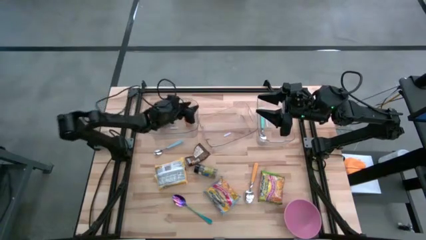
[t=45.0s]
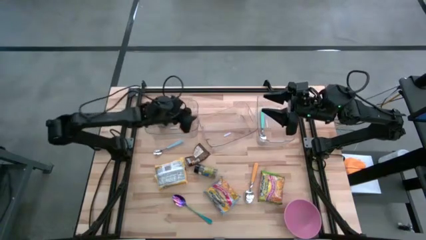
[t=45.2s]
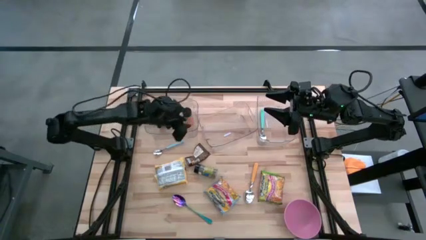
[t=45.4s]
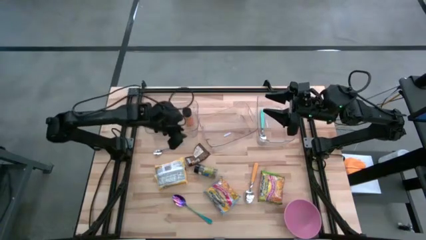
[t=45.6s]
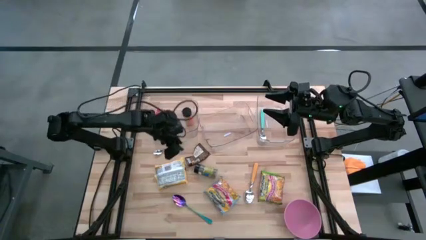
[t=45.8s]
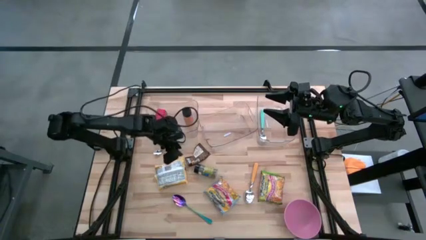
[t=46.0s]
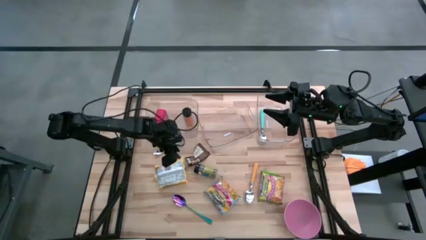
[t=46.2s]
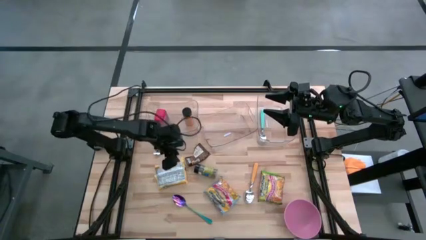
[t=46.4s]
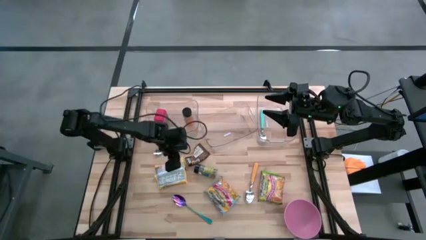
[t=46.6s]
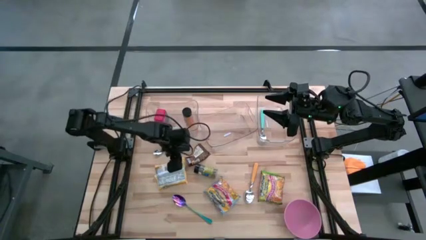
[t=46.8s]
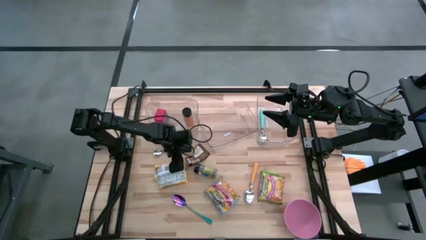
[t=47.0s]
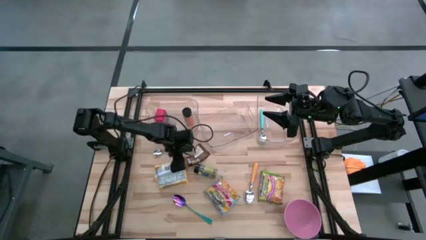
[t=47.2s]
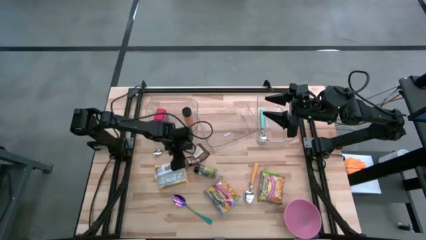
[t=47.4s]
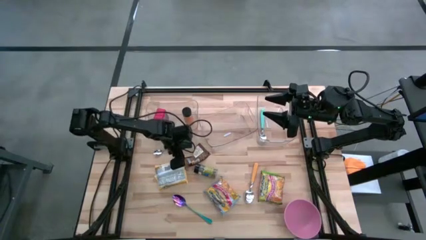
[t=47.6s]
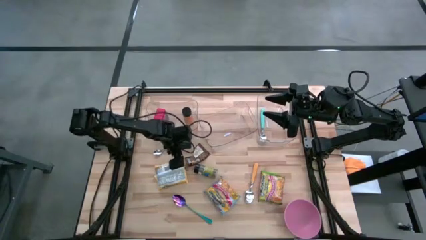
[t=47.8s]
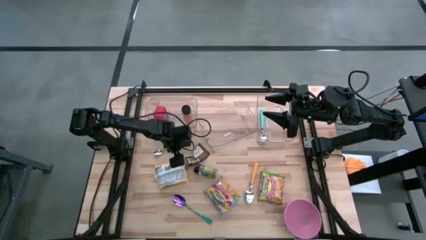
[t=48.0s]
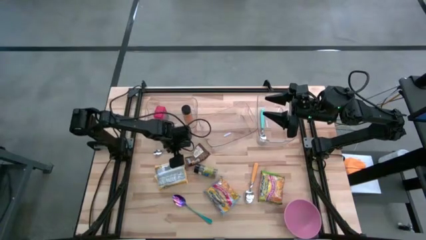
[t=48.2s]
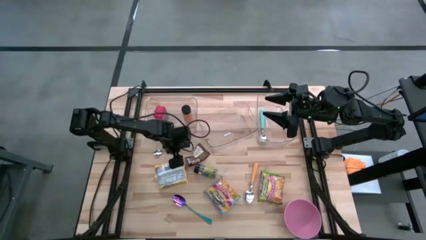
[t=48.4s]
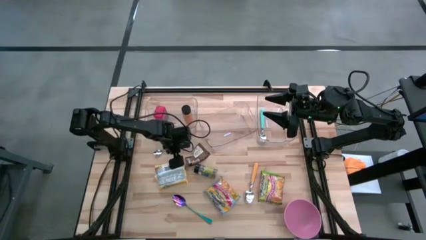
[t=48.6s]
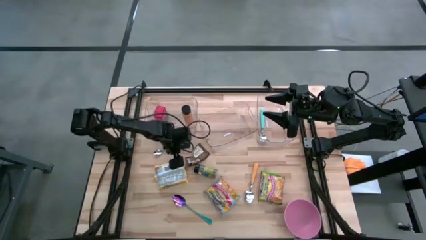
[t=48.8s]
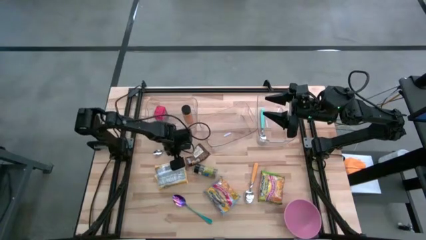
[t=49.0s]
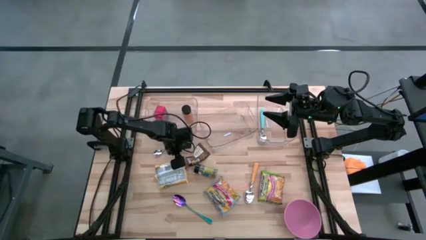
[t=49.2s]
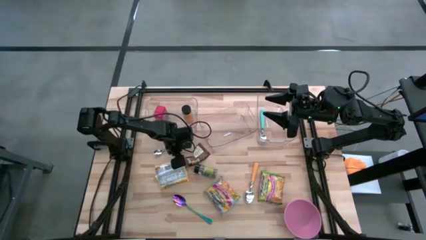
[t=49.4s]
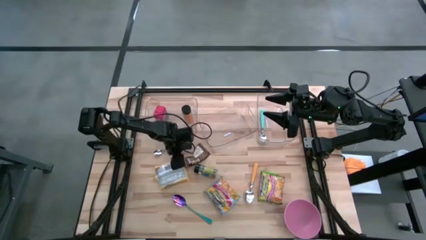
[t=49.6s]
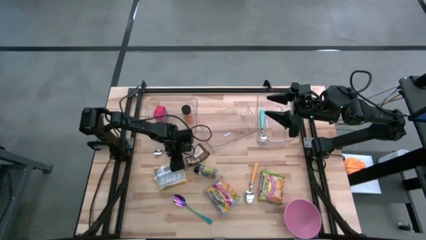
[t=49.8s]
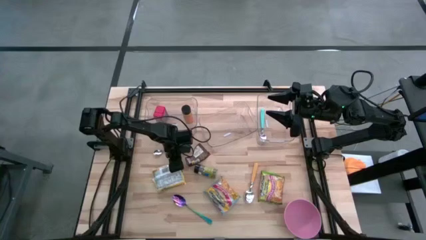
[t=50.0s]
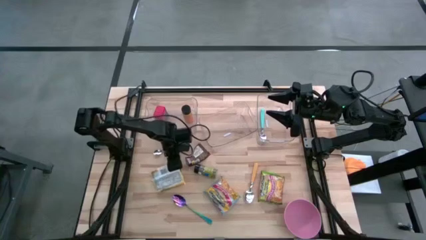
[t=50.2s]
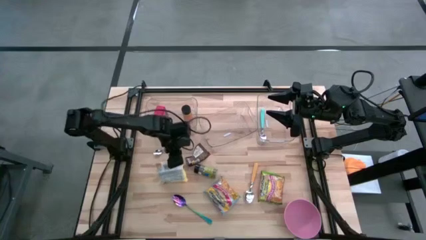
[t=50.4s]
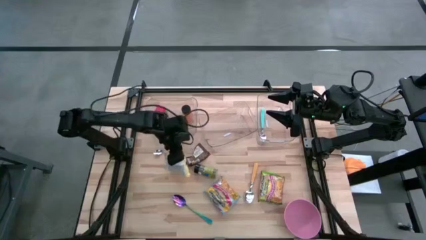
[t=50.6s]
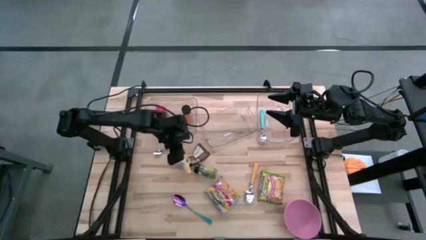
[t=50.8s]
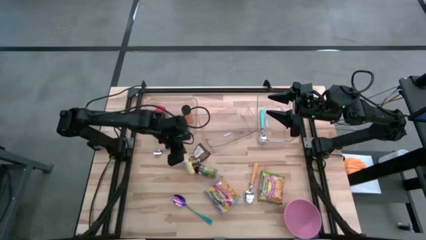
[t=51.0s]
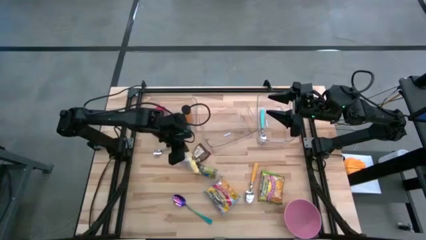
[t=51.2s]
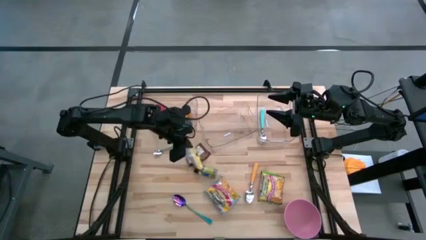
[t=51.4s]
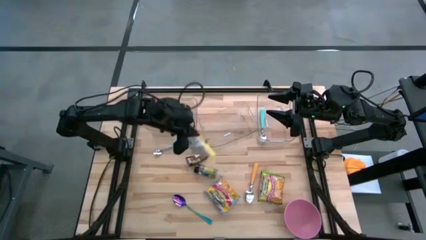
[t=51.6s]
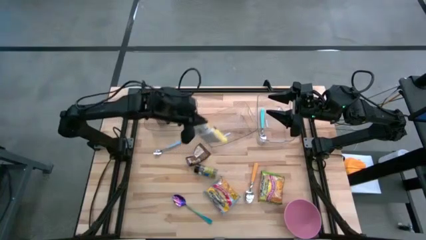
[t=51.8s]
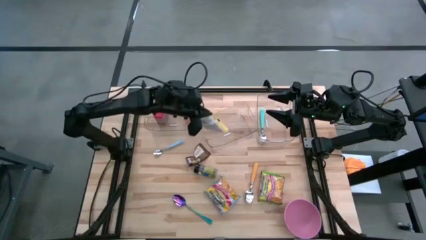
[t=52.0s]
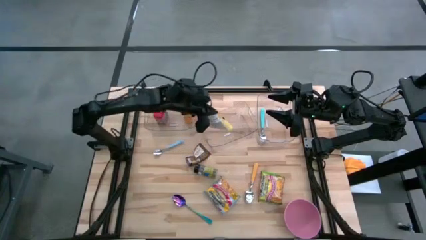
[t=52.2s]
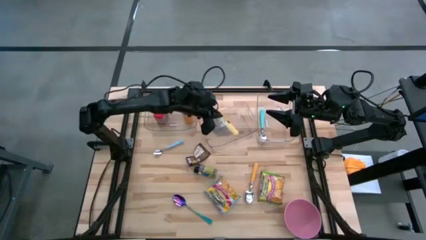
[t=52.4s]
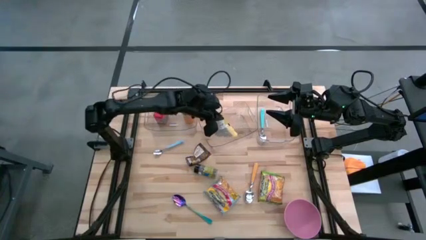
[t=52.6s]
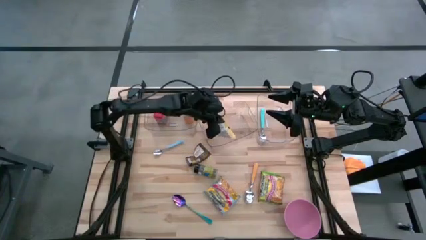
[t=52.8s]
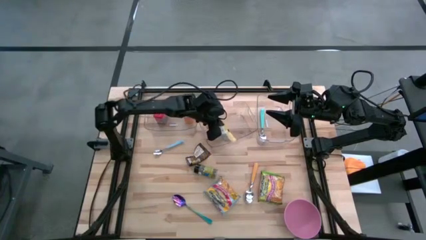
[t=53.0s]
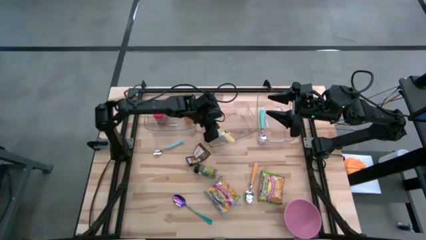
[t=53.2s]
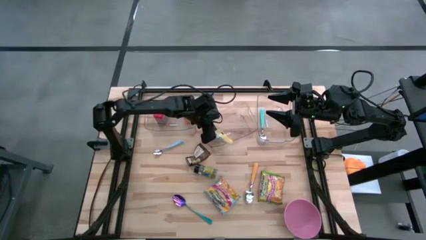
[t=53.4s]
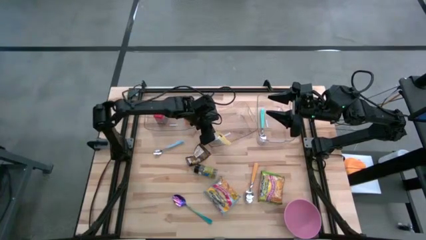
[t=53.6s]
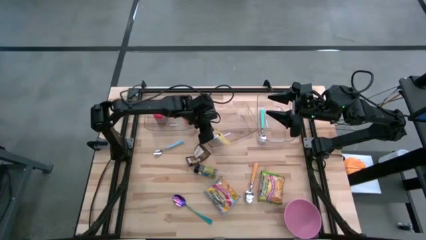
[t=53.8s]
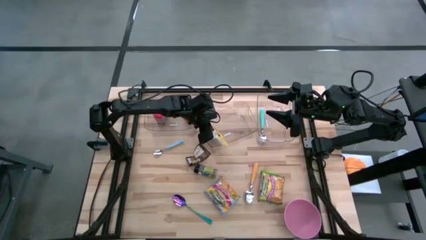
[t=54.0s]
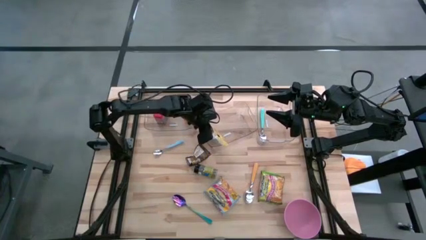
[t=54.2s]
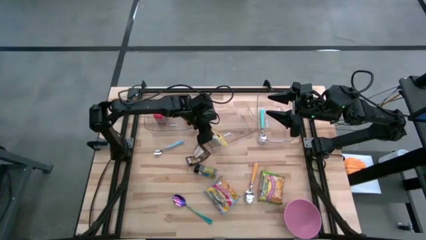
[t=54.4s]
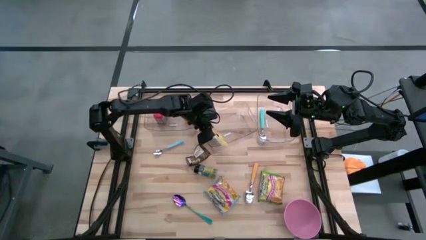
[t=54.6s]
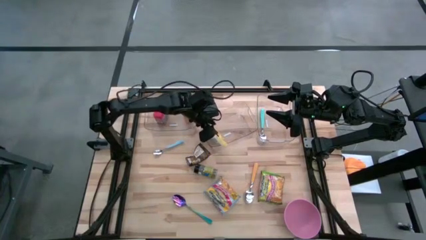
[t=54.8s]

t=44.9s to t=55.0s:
Task: Pick & Place Food Item
Put the yellow noodle pack into the middle transparent bin

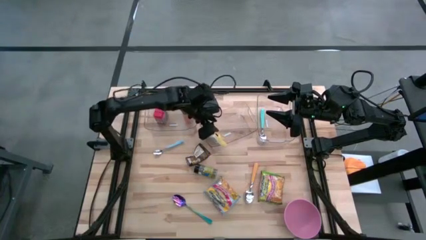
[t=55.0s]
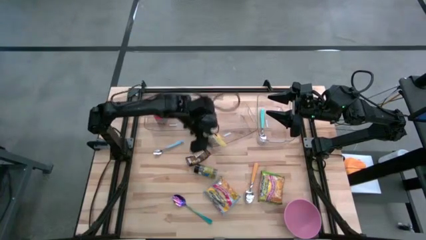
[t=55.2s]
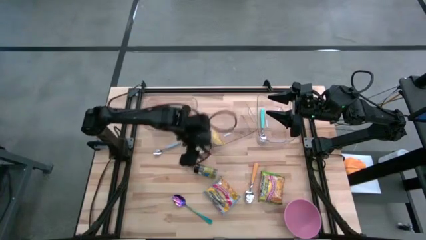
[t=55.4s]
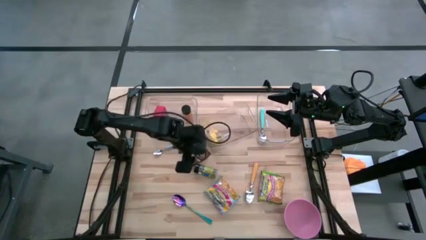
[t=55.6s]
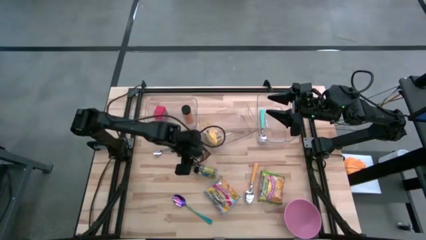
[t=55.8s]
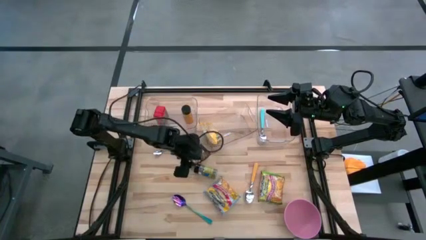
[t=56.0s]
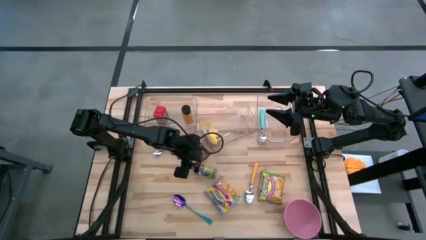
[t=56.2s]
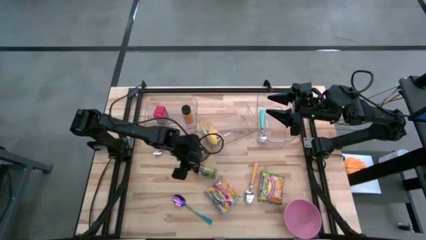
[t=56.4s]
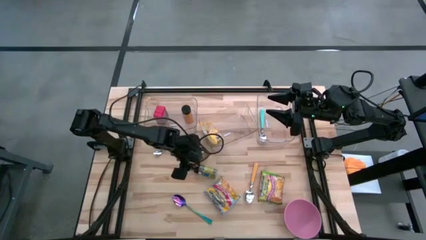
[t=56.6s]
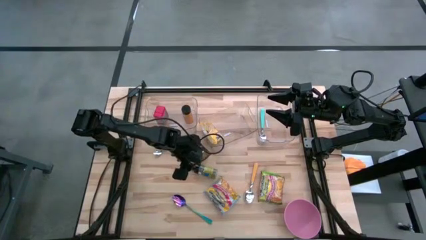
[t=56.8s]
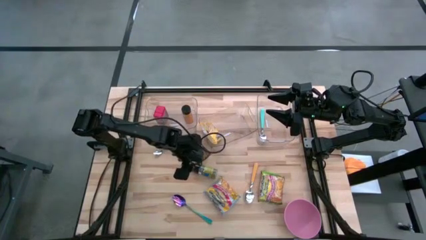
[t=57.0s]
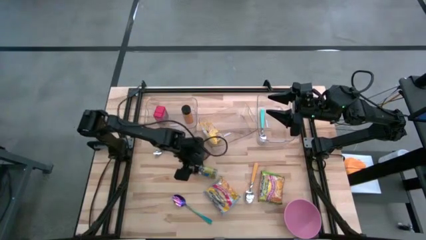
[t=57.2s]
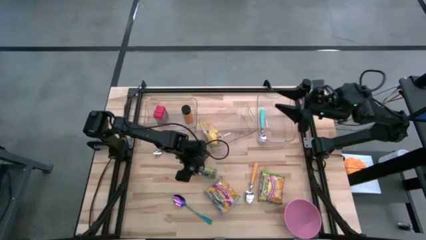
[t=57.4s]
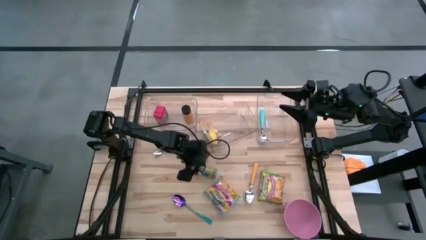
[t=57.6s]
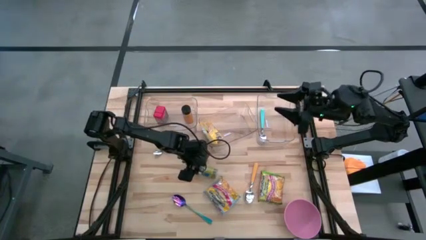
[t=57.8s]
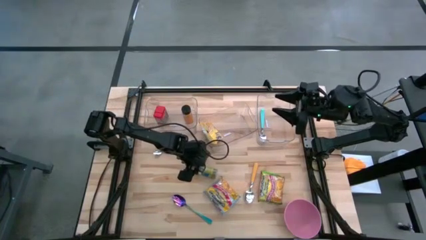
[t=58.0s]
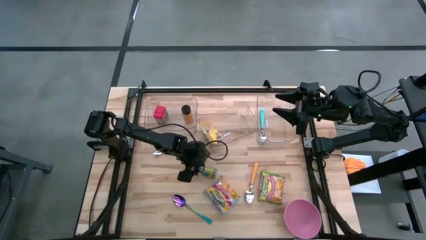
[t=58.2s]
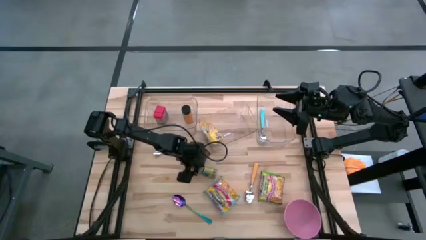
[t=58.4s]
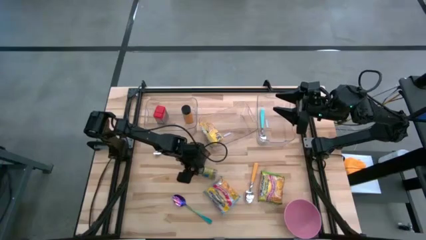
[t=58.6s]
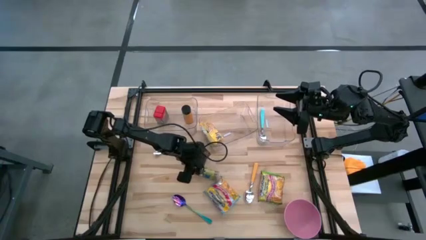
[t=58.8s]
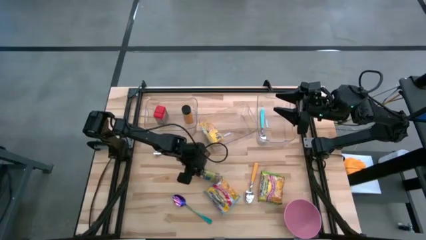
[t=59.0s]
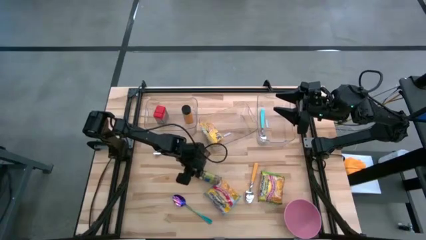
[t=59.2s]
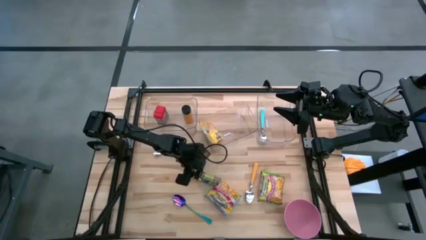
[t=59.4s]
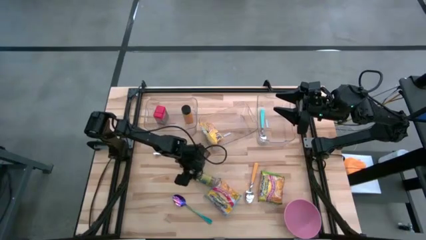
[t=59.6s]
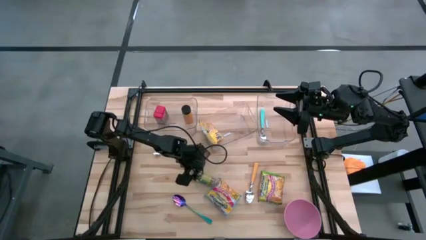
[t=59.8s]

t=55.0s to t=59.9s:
Put the green seasoning bottle into the left transparent bin

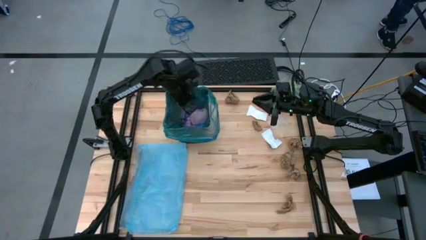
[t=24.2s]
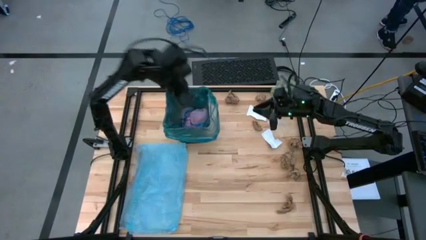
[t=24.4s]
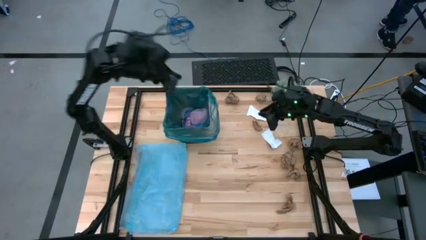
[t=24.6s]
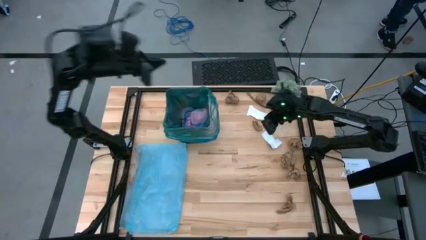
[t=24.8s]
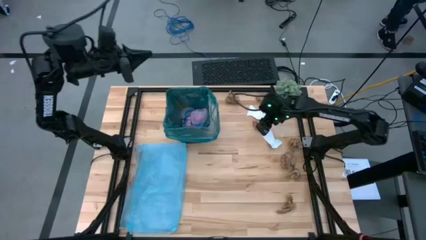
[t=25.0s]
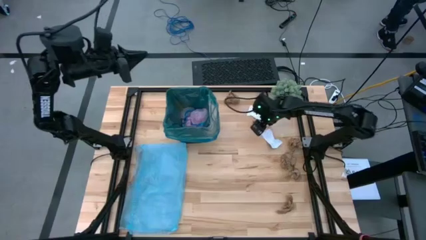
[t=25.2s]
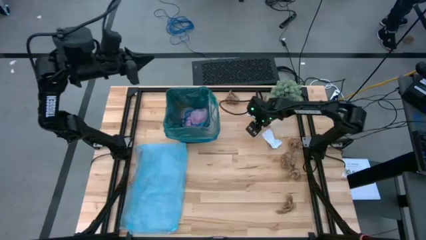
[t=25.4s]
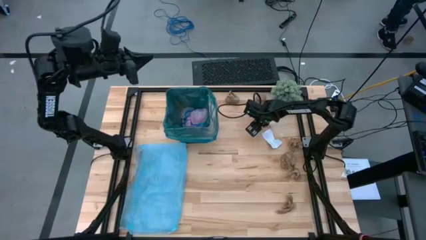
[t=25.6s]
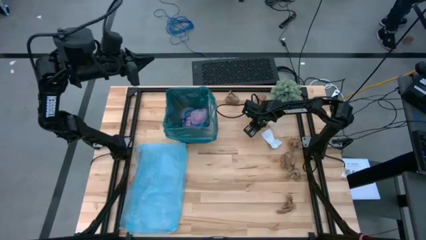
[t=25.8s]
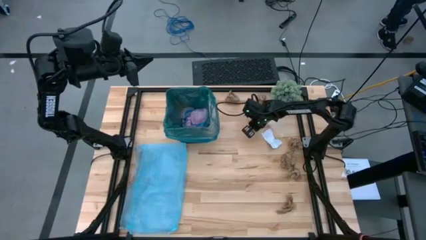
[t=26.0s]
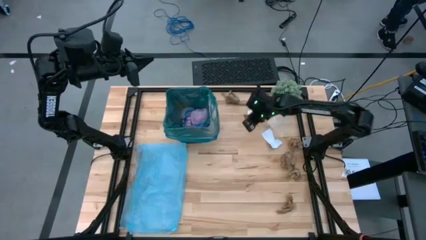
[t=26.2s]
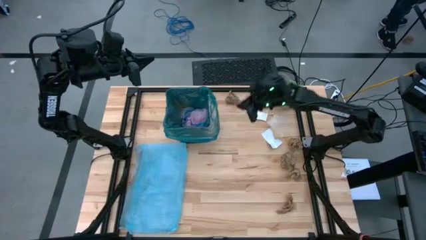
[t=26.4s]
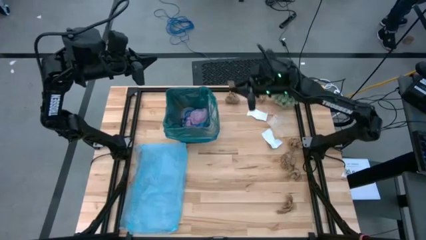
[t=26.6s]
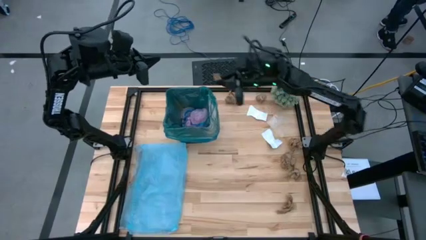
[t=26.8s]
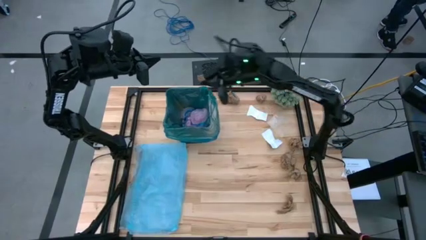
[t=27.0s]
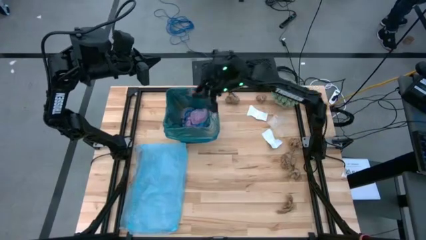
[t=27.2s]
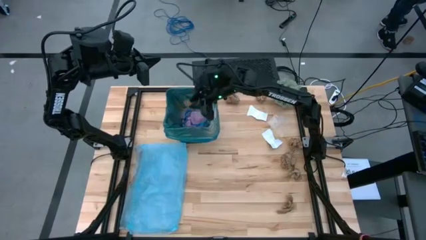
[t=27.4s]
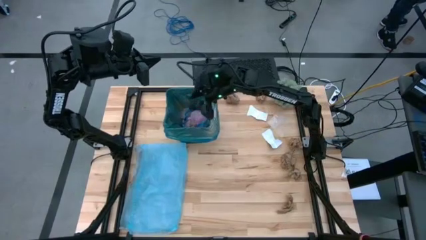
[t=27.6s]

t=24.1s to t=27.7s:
Task: place trash/remove bag and relplace
Put the brown napkin into the trash bin
